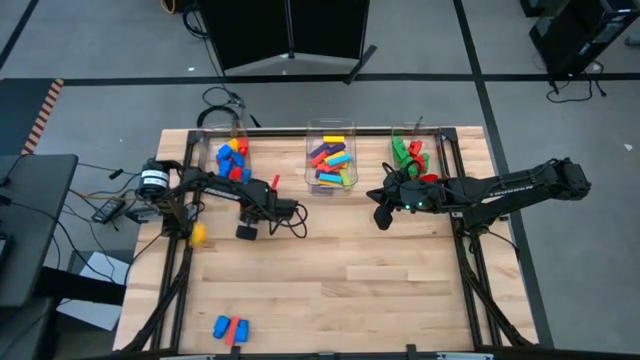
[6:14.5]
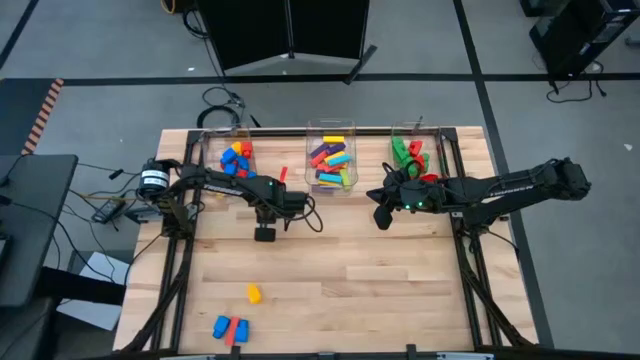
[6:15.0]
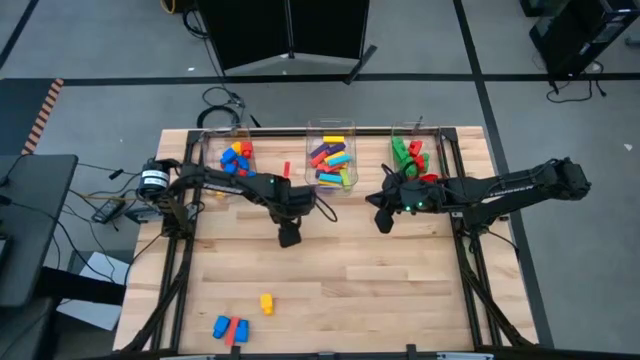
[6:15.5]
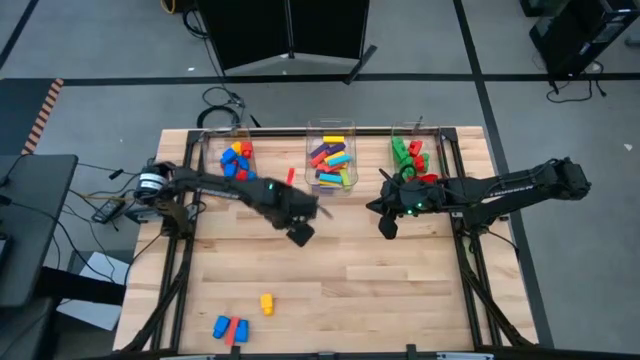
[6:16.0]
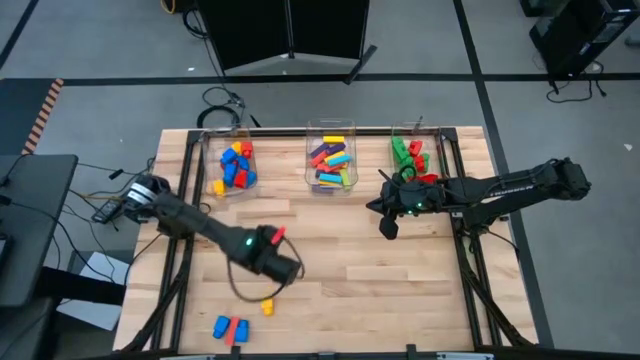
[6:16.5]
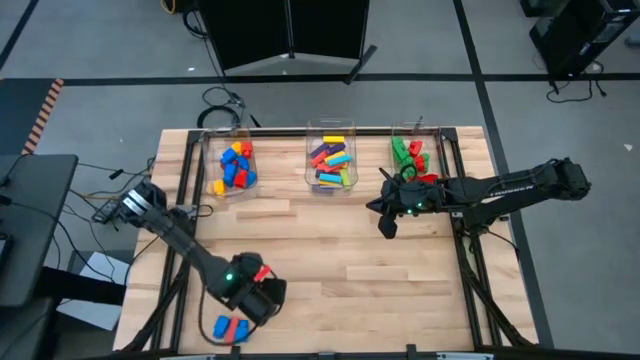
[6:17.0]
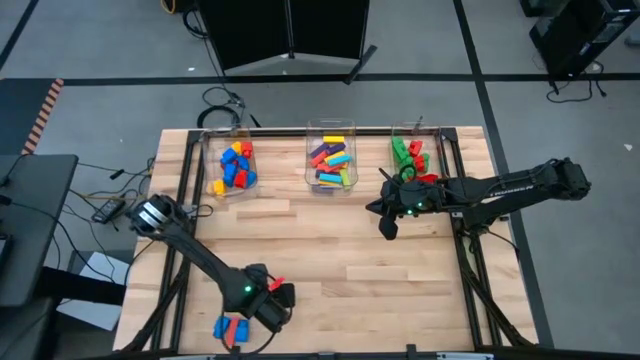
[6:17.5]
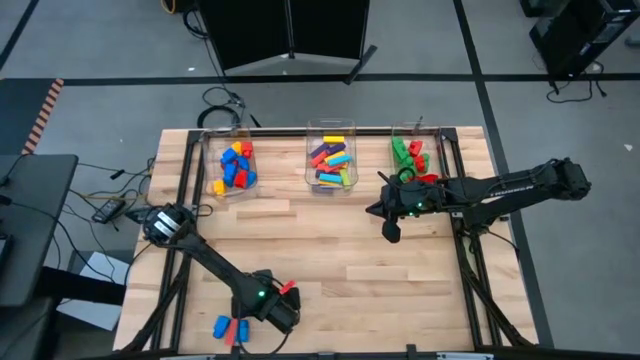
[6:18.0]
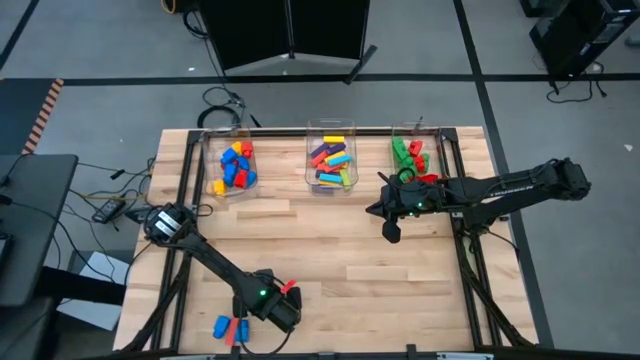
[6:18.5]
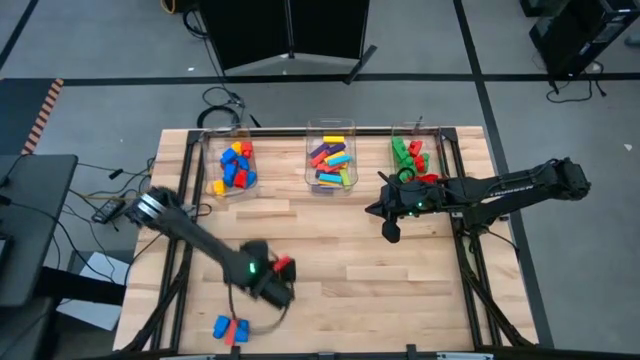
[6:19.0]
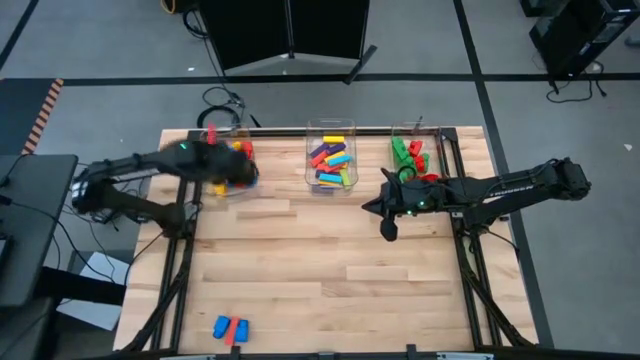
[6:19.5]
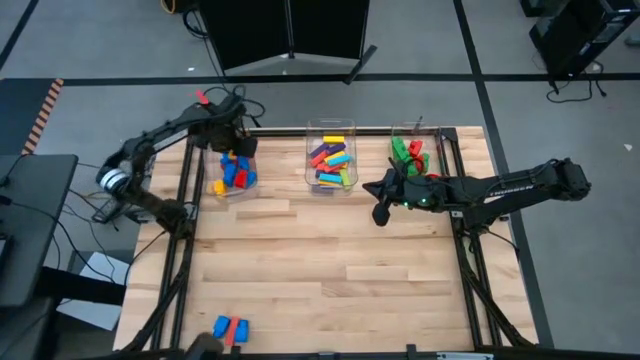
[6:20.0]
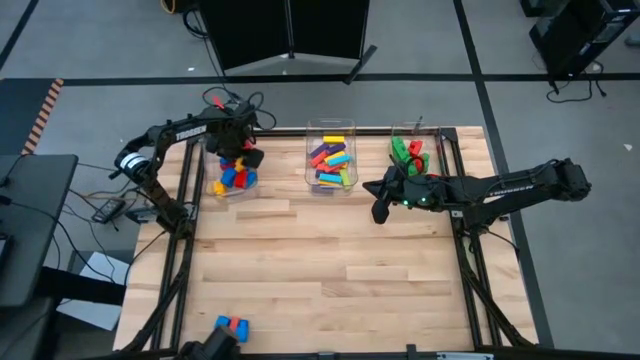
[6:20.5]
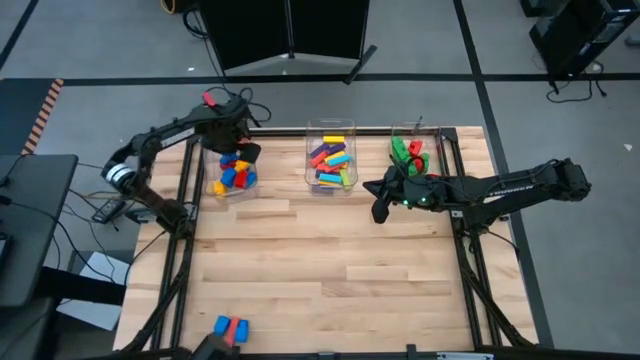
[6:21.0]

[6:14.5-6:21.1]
Task: Sort blocks by size
Put the yellow 1 stud game piece into the left transparent bin

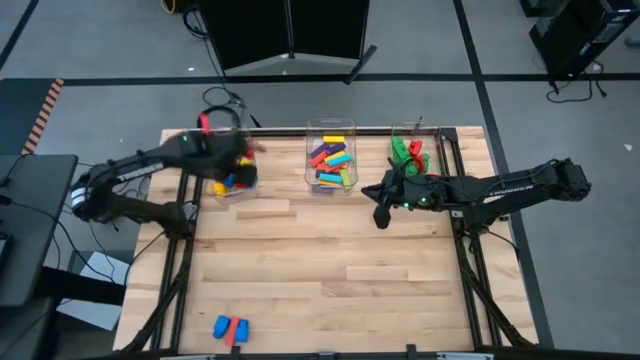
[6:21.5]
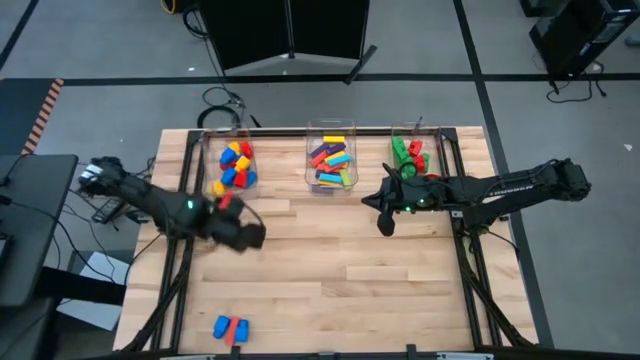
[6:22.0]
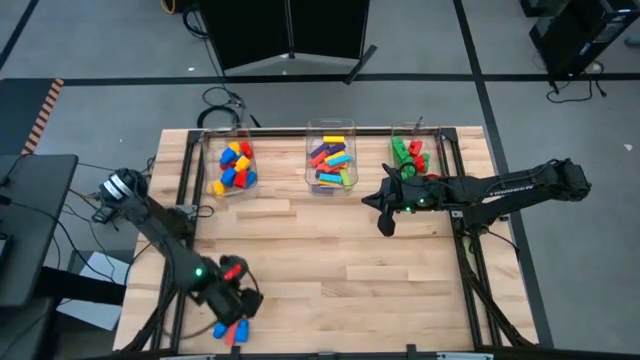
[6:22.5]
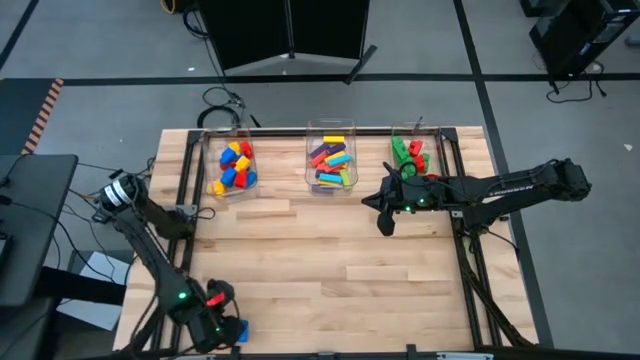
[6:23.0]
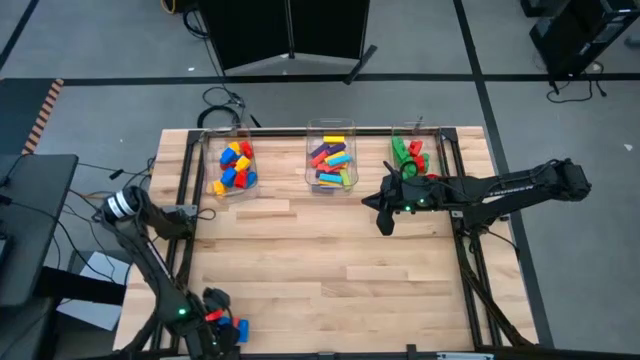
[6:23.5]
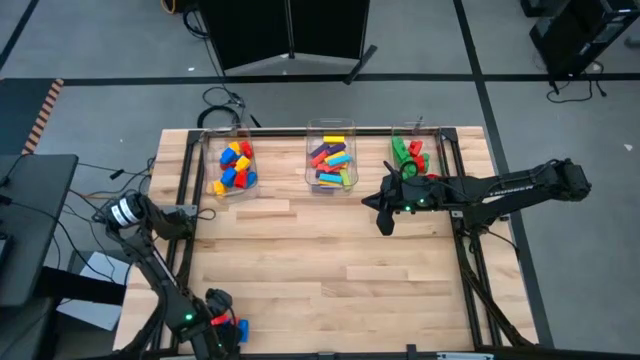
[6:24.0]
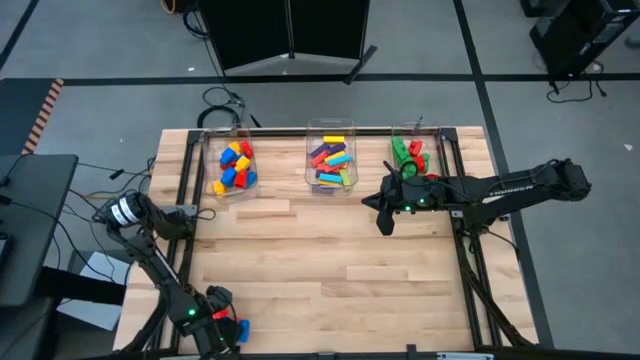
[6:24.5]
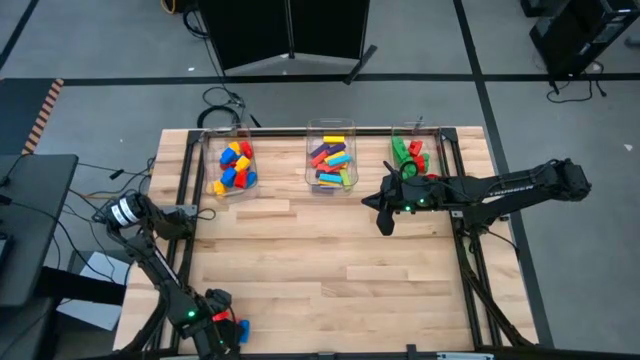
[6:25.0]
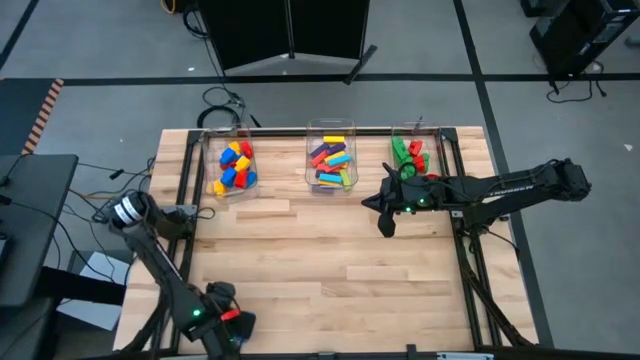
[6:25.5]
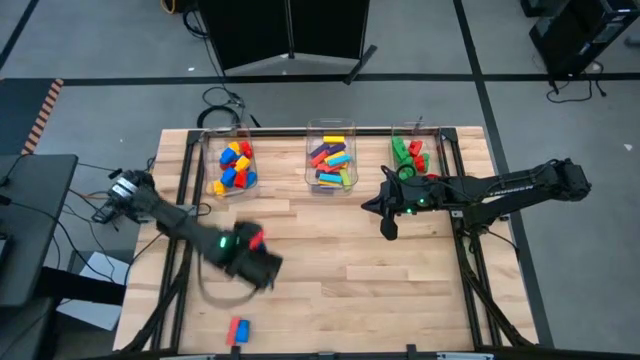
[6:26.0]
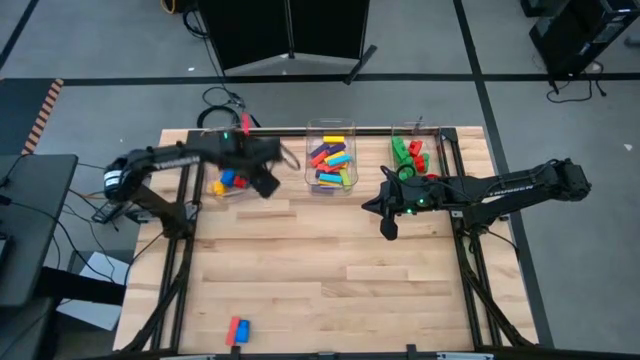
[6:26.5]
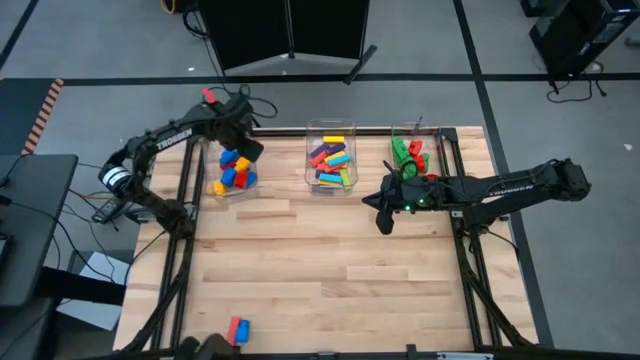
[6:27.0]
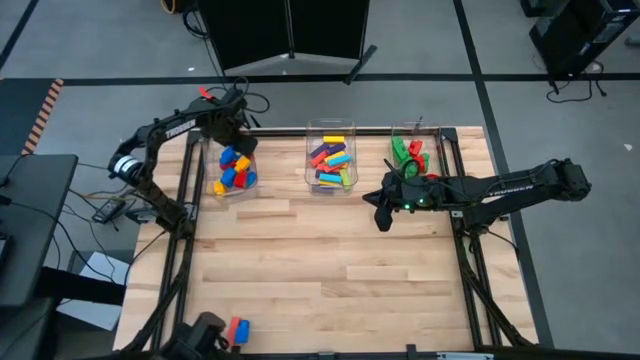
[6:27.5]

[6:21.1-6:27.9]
Put the blue 1 stud game piece into the left transparent bin

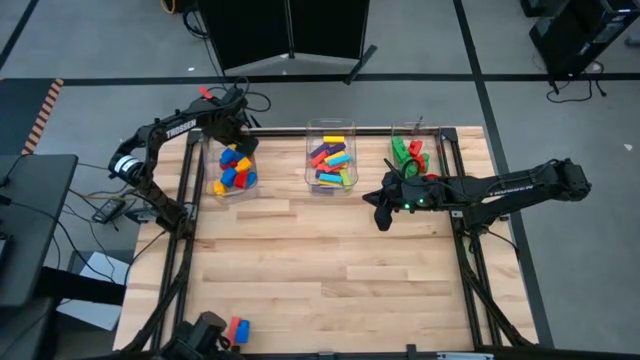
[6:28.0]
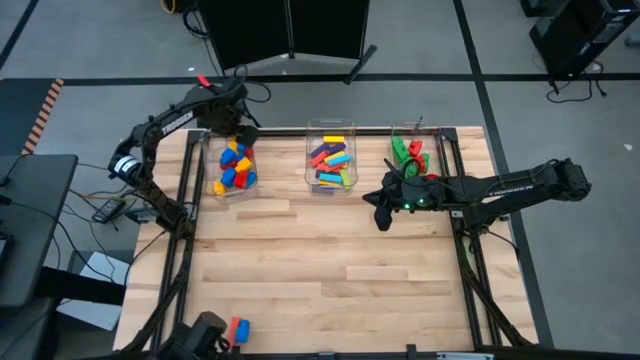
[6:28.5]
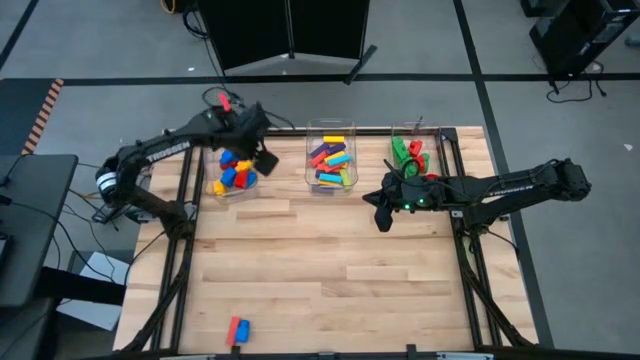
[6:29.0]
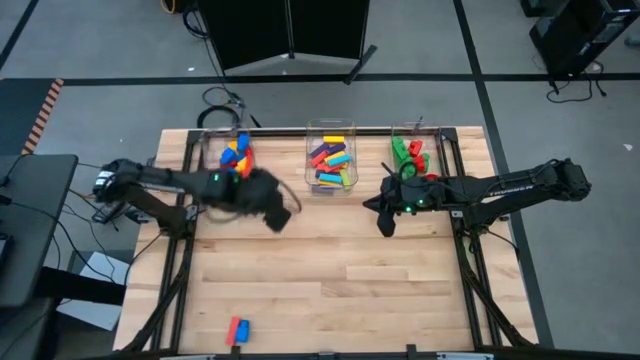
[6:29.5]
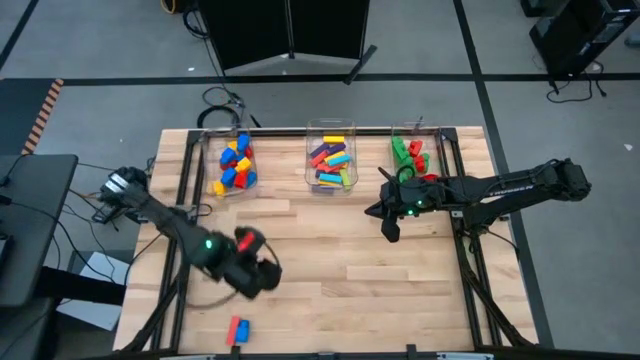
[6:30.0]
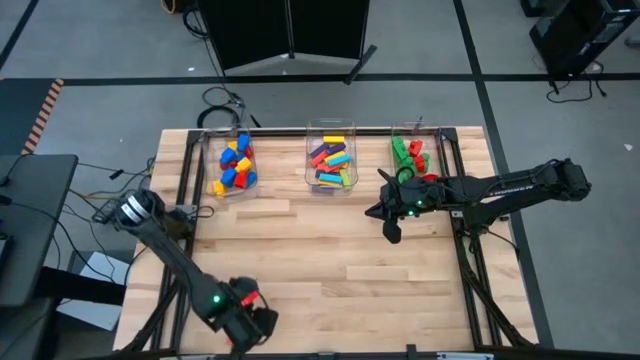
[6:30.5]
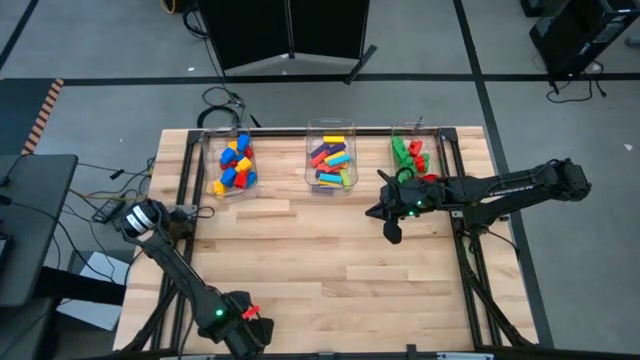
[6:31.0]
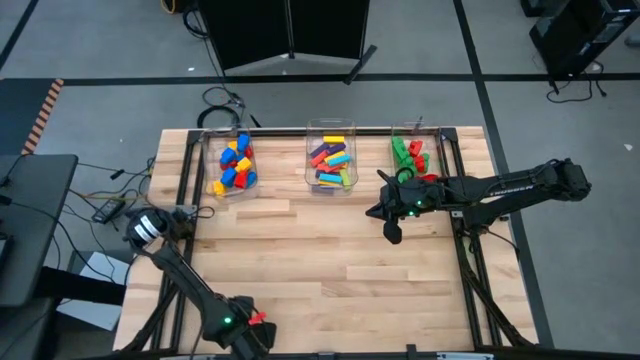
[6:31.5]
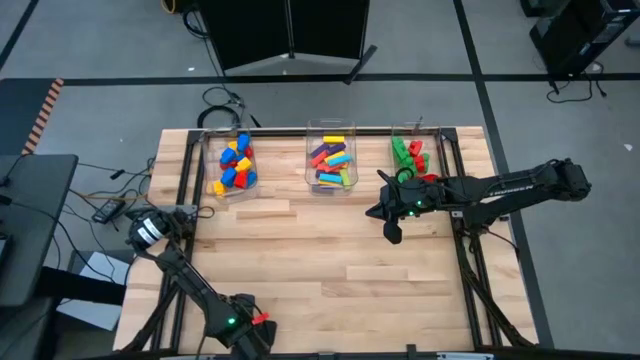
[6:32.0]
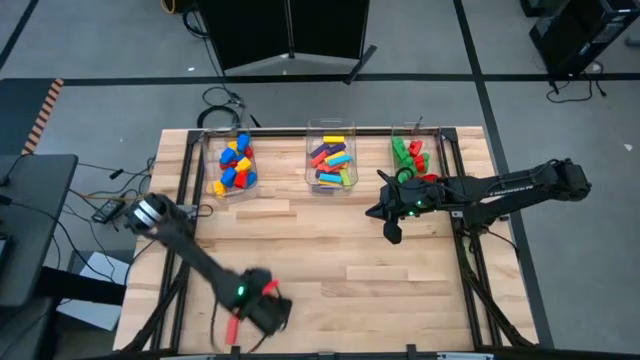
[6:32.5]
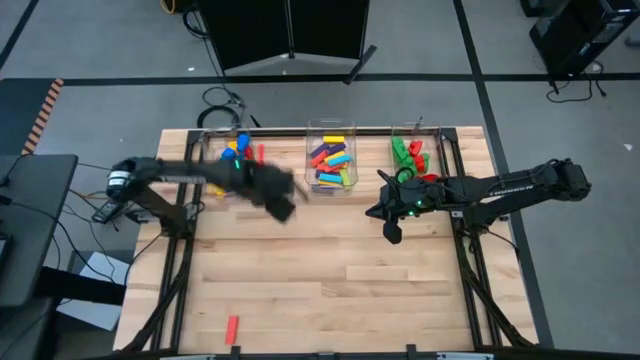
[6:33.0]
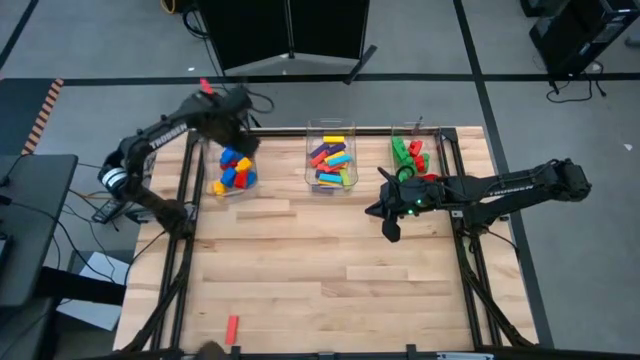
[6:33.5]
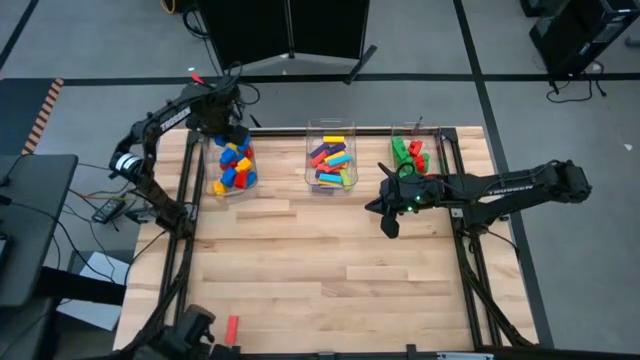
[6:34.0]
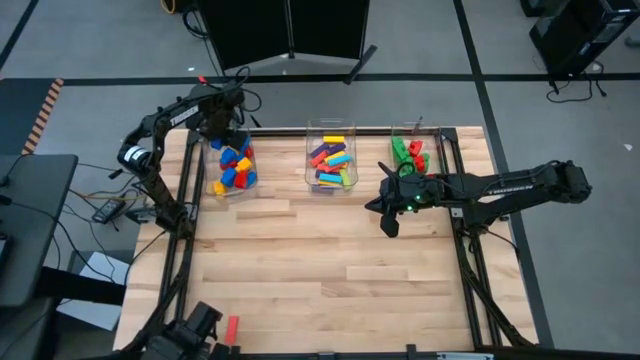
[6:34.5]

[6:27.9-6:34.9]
Put the blue 1 stud game piece into the left transparent bin
